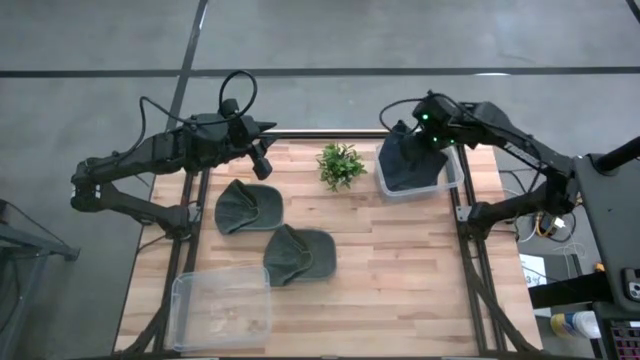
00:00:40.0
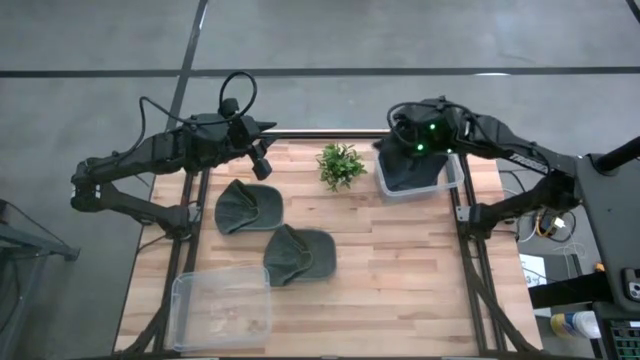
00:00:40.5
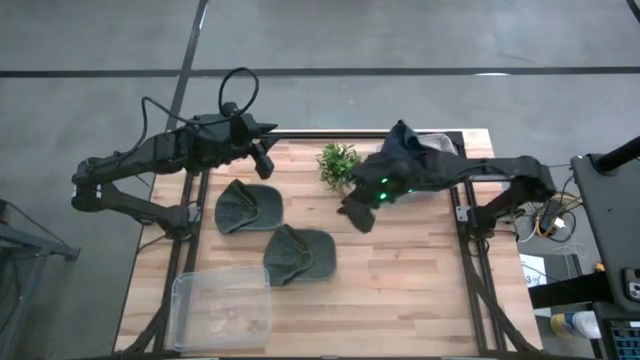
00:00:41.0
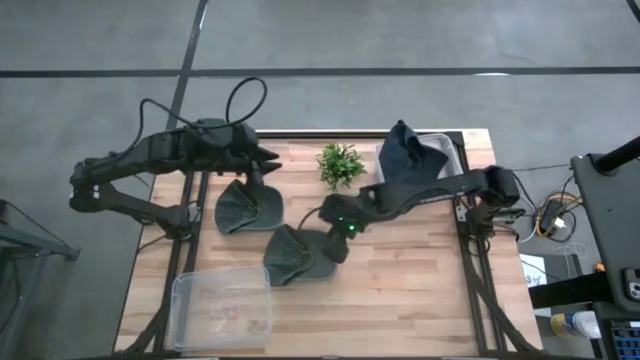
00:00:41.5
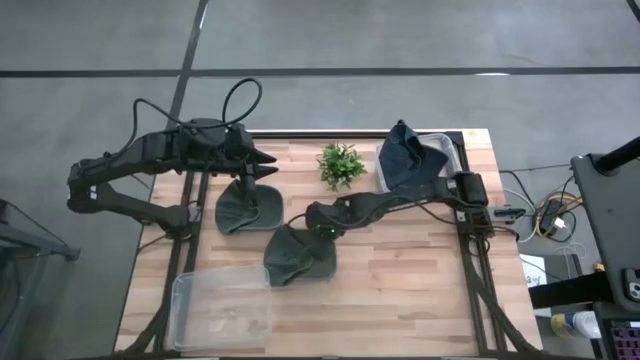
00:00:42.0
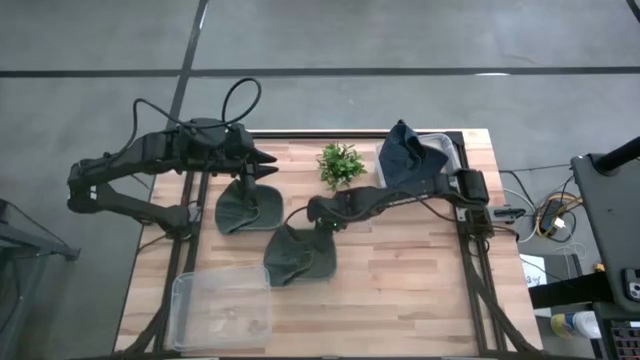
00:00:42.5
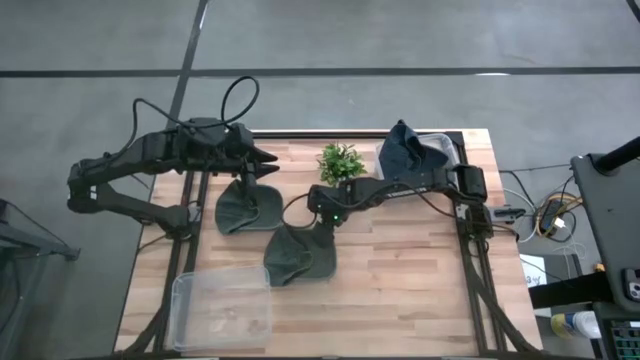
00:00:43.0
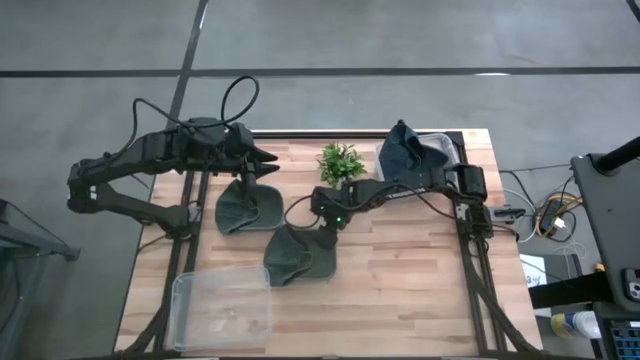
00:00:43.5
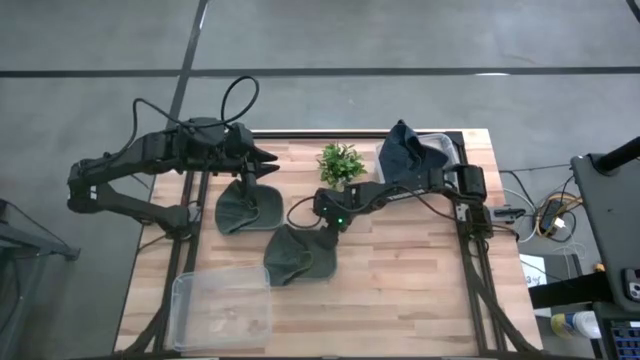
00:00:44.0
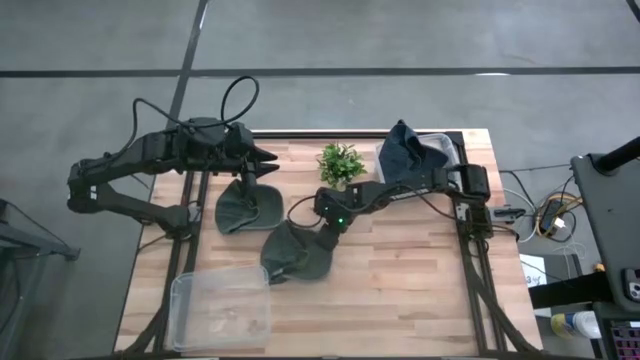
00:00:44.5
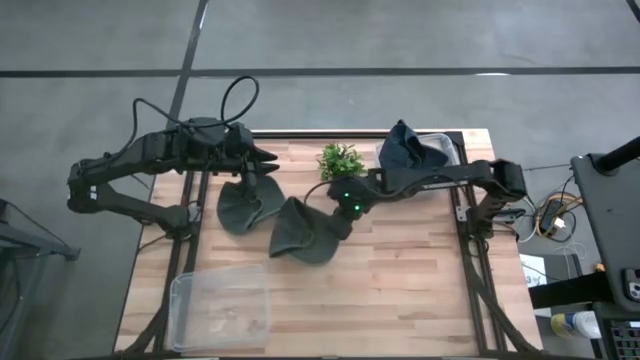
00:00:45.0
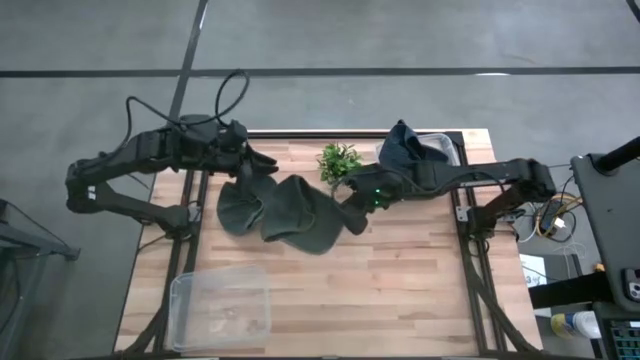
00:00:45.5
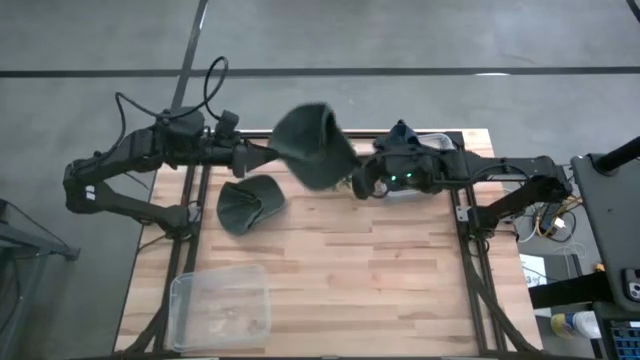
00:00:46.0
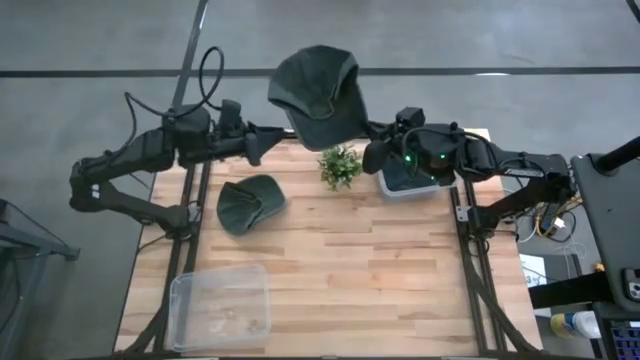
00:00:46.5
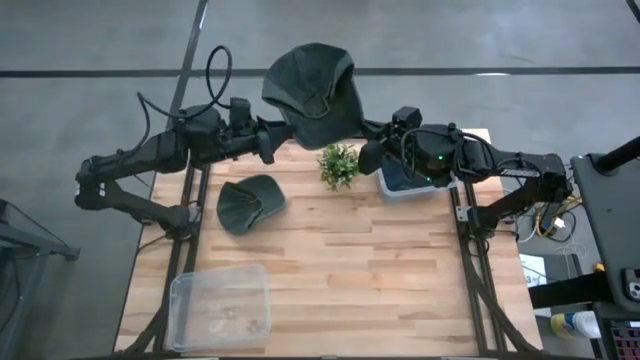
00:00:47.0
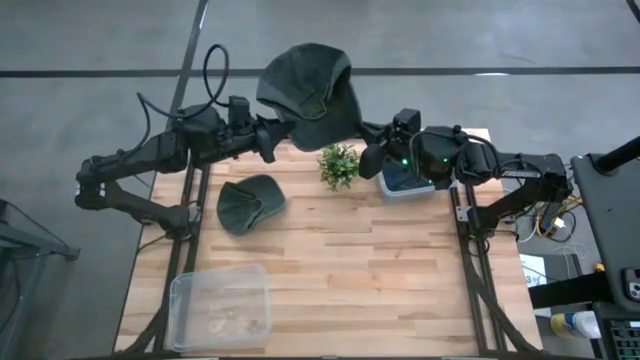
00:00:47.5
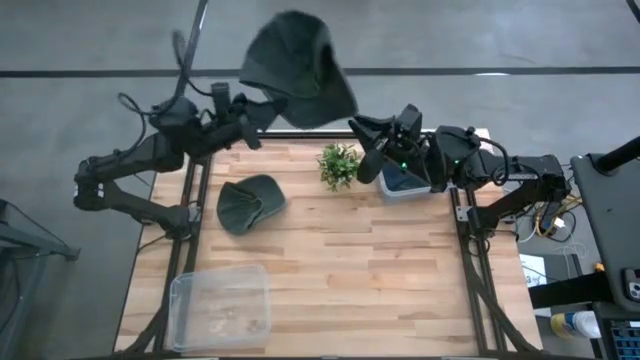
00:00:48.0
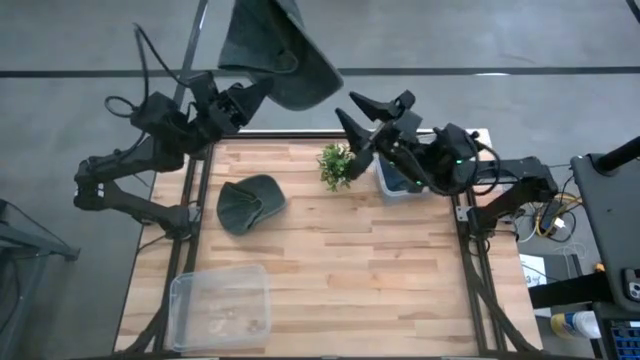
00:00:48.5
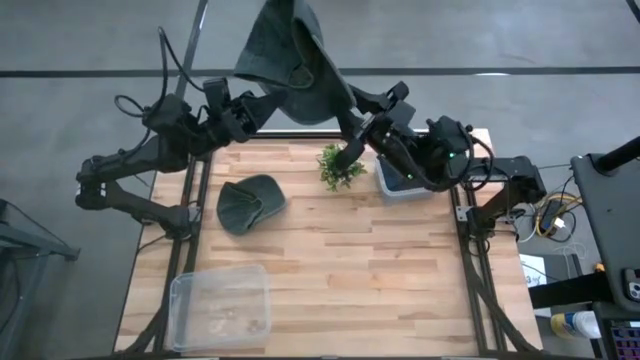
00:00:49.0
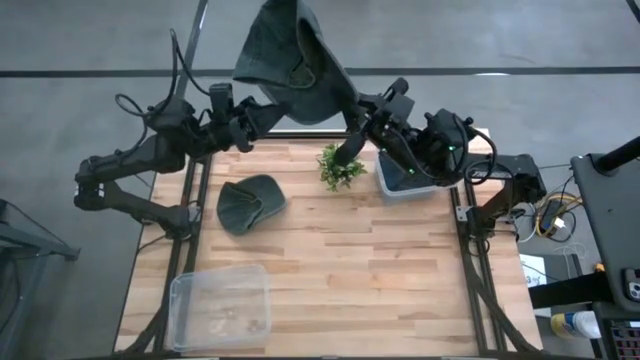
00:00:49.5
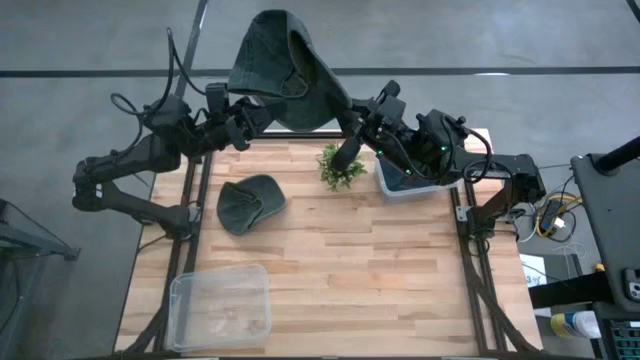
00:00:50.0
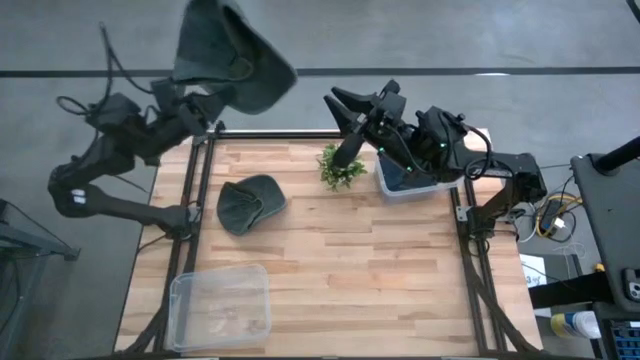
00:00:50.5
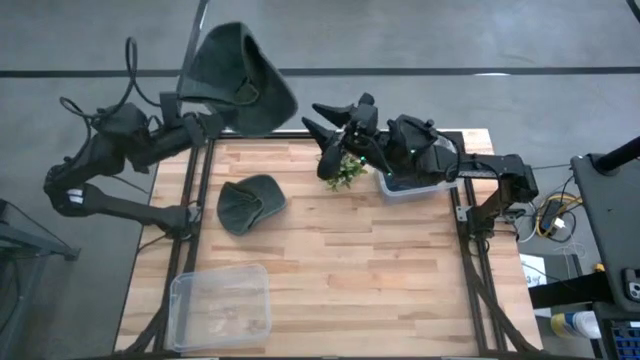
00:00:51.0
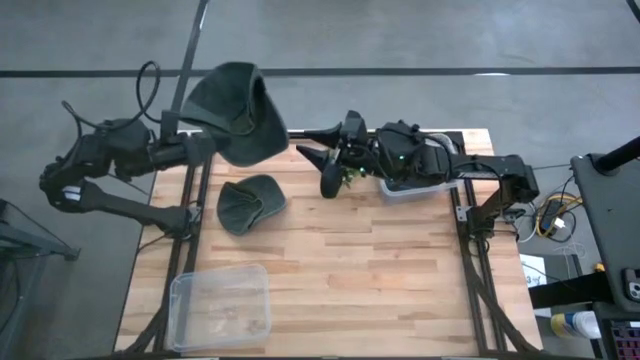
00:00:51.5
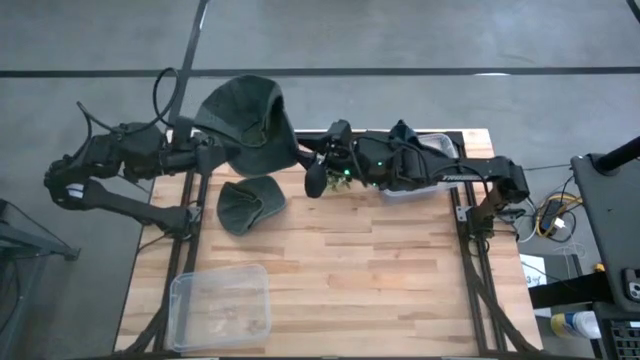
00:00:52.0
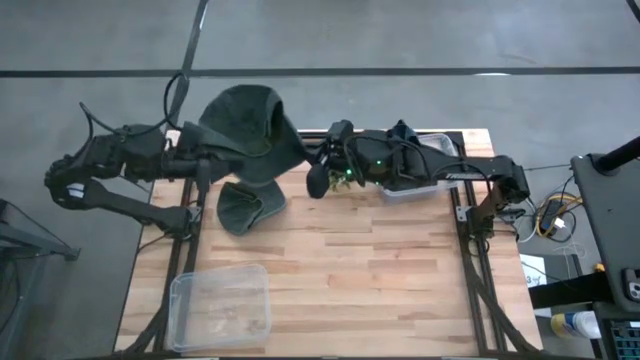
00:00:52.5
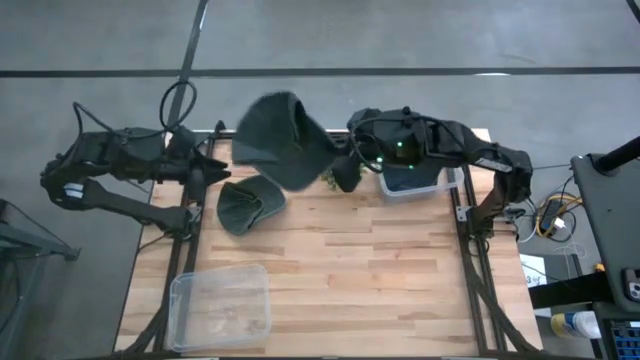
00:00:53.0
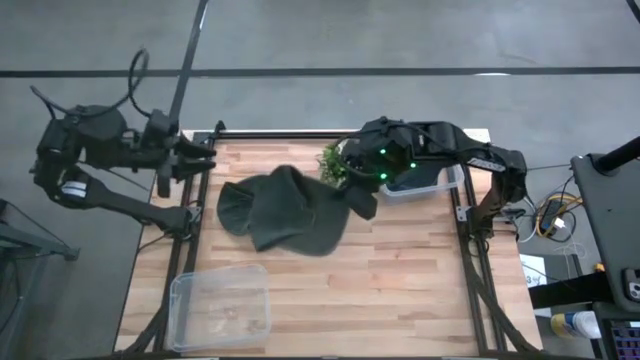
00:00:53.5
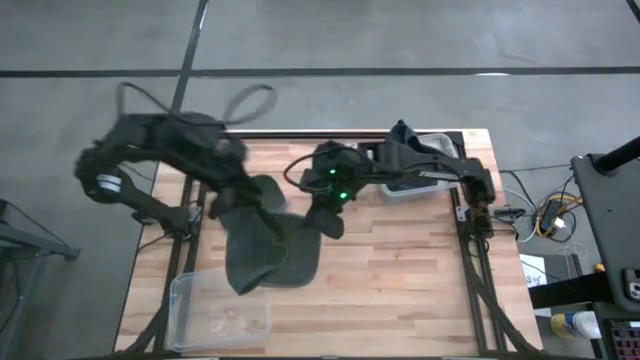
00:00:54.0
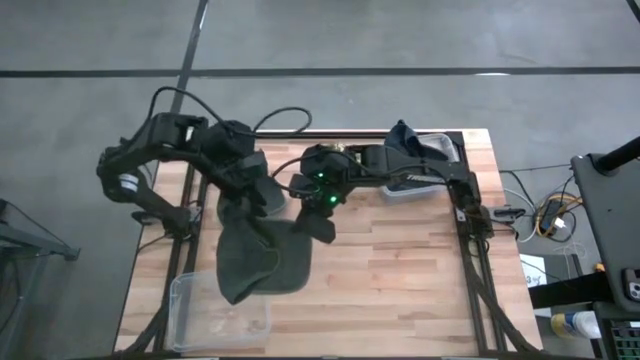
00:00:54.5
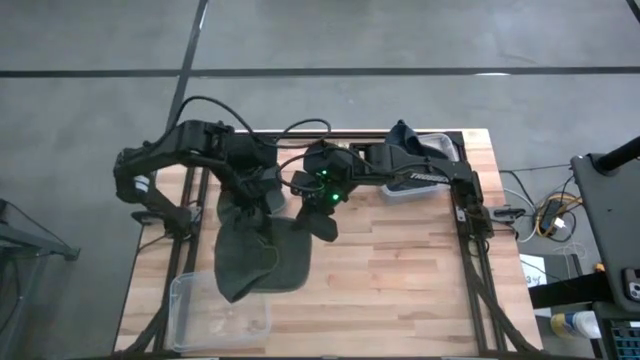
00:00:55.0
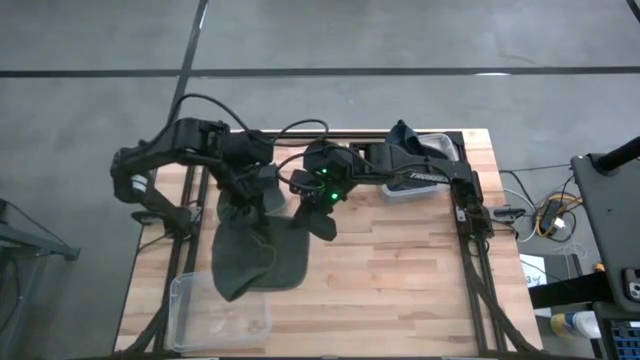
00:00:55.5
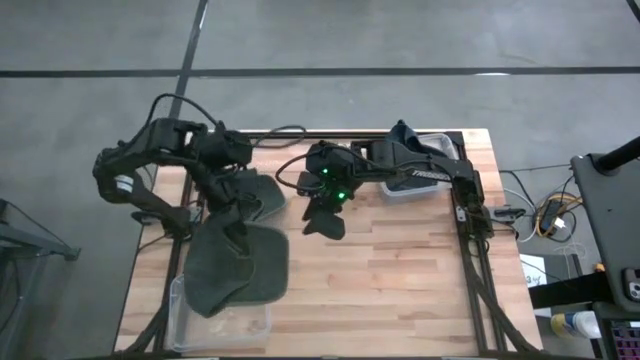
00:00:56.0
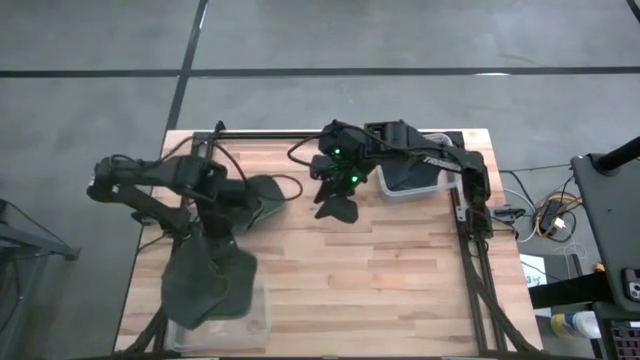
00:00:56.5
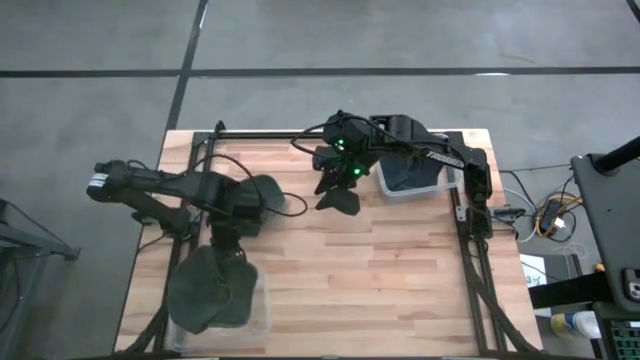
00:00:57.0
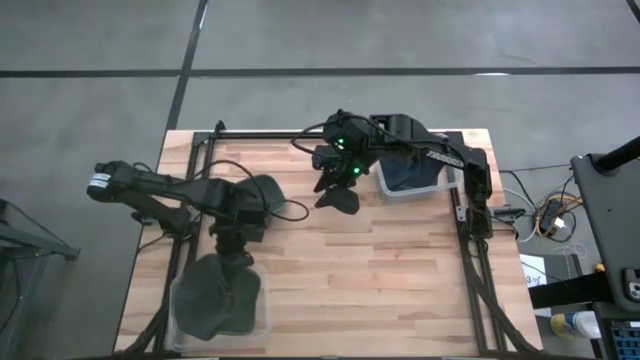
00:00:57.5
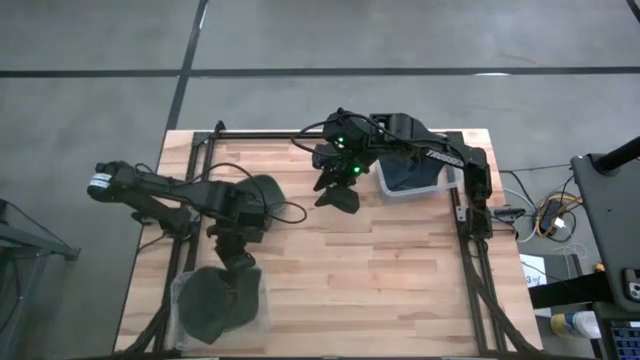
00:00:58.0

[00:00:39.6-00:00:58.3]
Task: Pick & Place hat
Put the bottom black cap into the bottom transparent bin

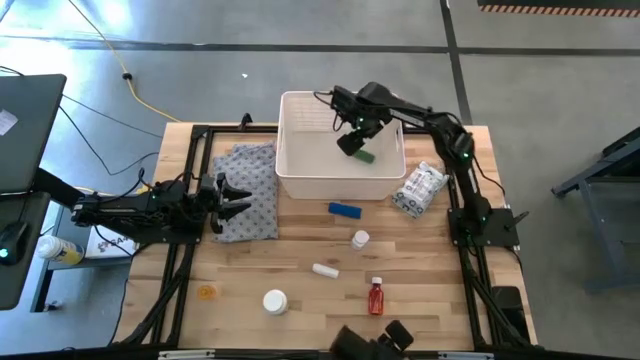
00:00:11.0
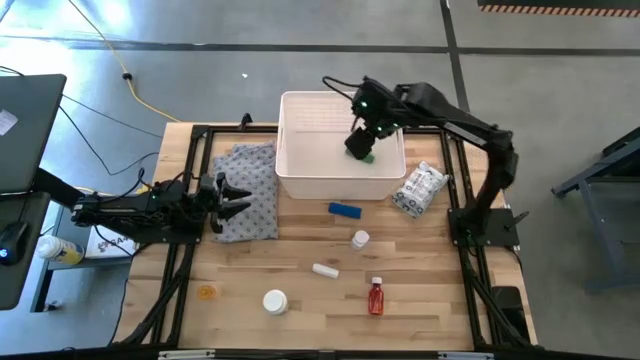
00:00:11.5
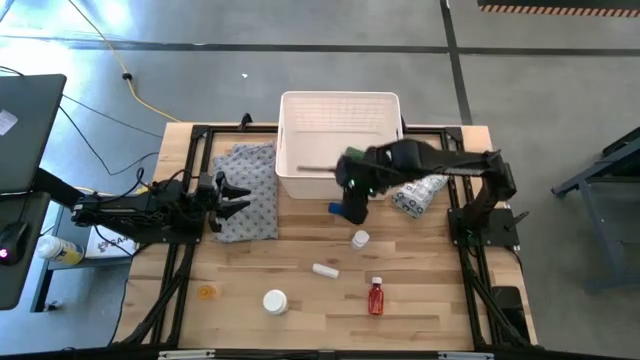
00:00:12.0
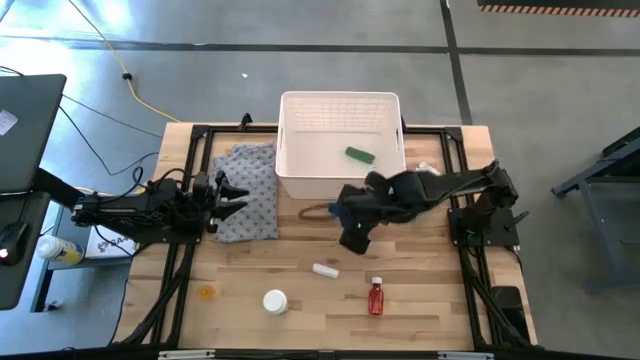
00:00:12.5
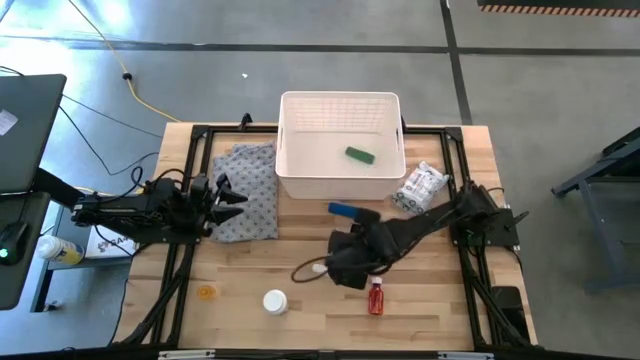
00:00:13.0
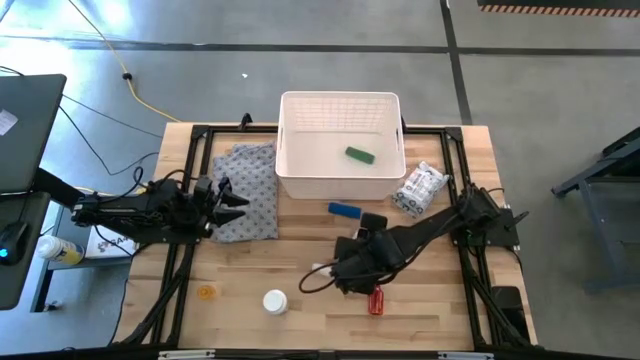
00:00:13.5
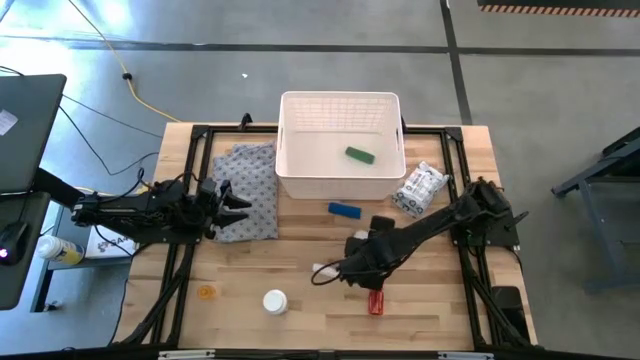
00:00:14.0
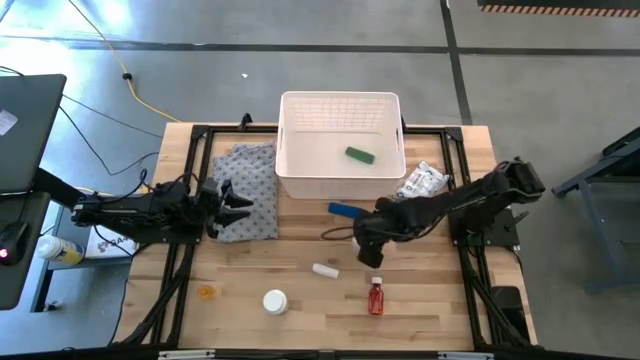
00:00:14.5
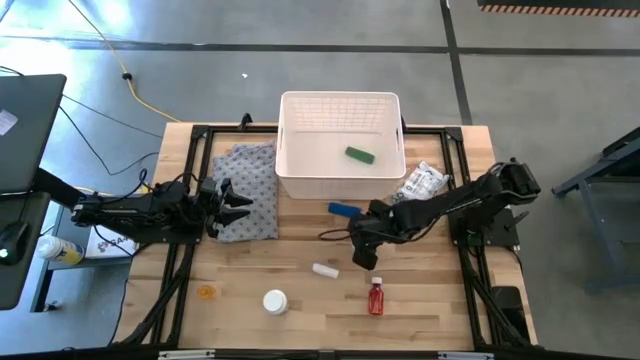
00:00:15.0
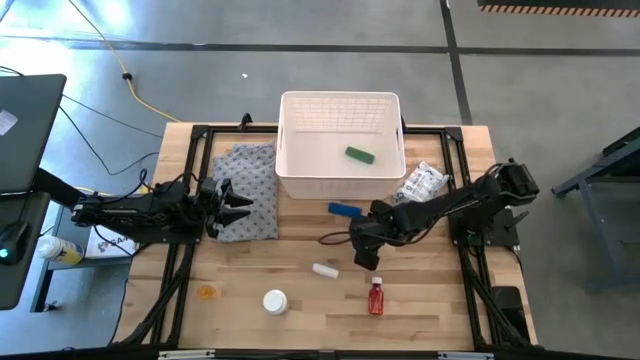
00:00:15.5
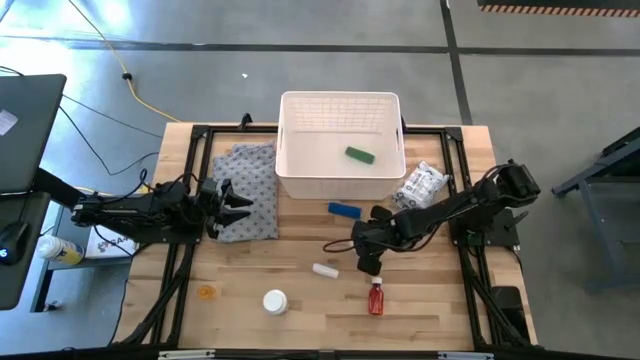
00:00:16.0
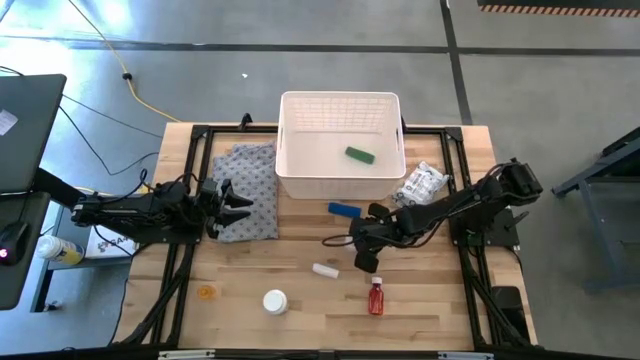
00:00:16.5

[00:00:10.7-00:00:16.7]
Task: Pick & place medical supplies in basket/bin
Put the small white pill bottle into the white bin
